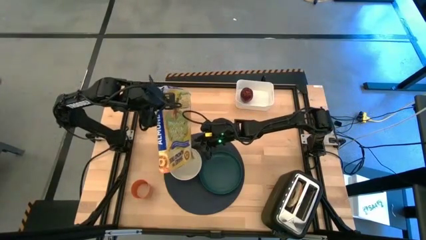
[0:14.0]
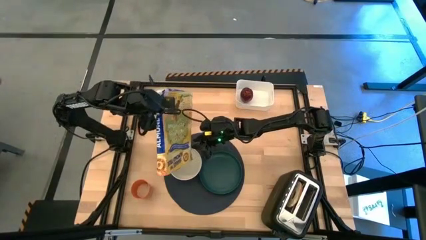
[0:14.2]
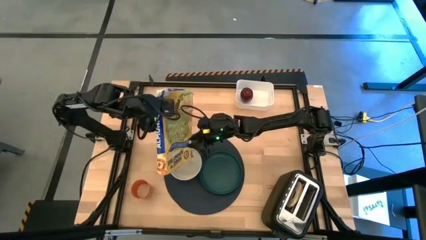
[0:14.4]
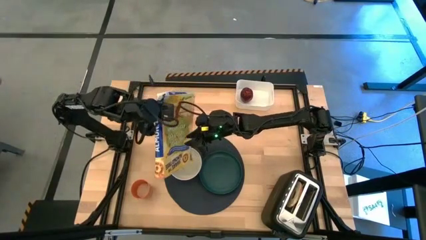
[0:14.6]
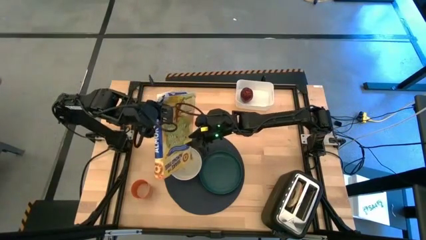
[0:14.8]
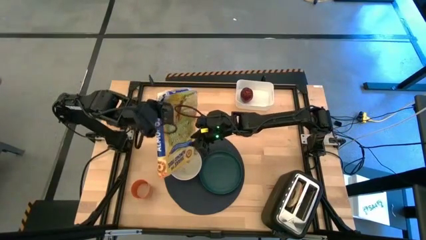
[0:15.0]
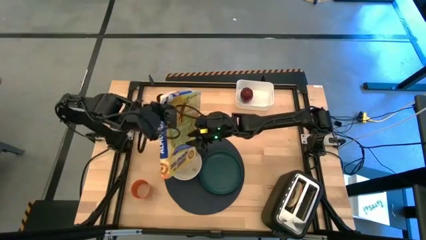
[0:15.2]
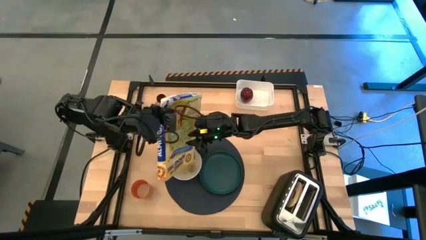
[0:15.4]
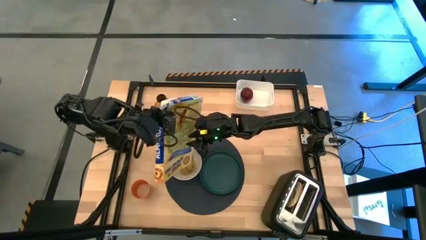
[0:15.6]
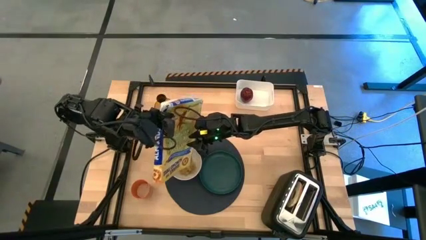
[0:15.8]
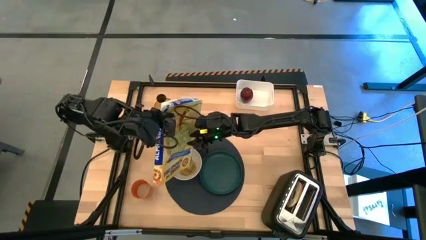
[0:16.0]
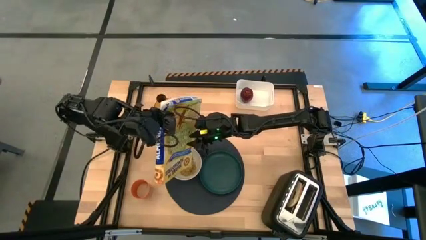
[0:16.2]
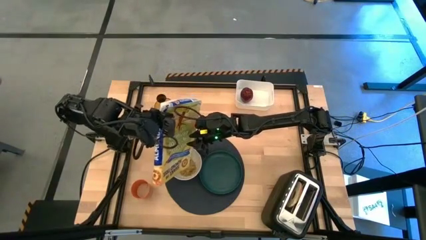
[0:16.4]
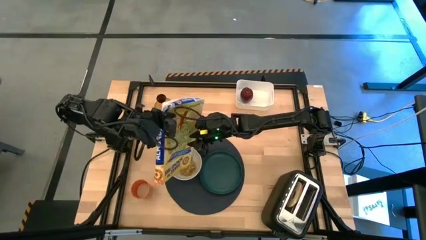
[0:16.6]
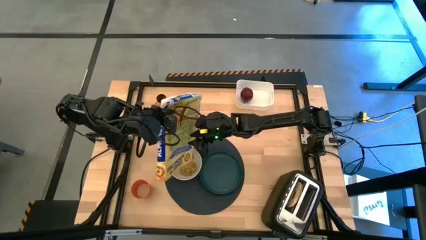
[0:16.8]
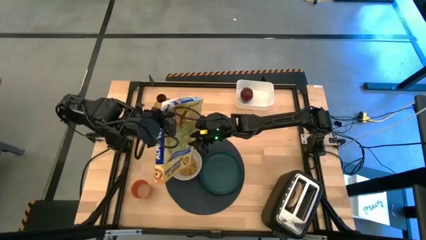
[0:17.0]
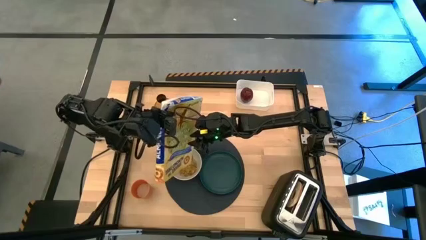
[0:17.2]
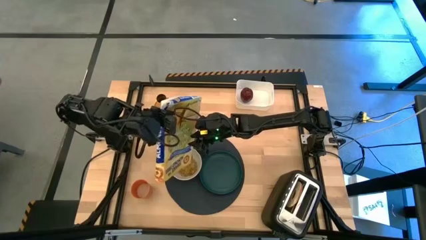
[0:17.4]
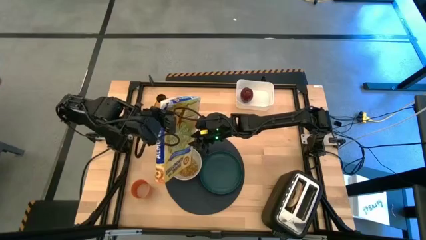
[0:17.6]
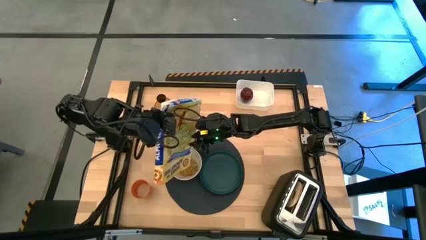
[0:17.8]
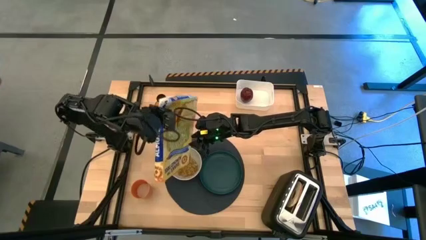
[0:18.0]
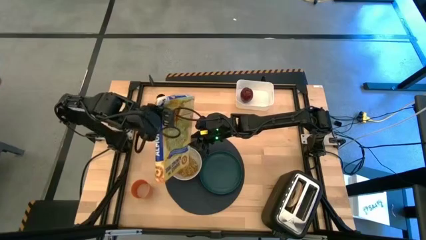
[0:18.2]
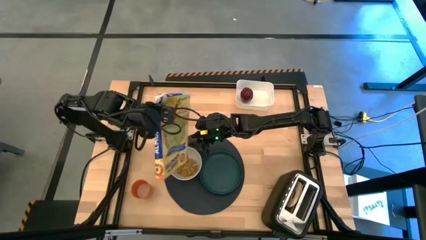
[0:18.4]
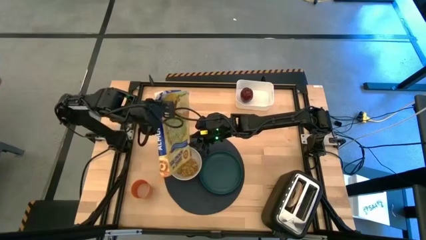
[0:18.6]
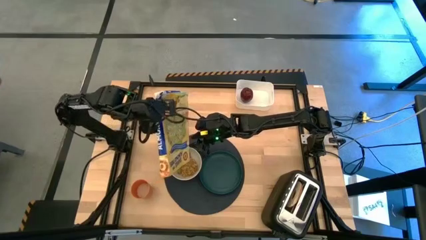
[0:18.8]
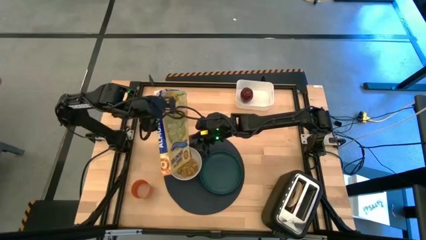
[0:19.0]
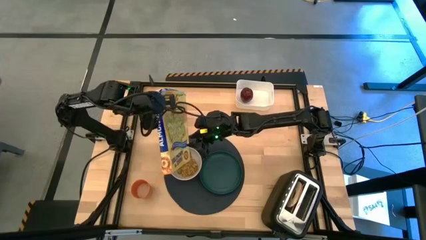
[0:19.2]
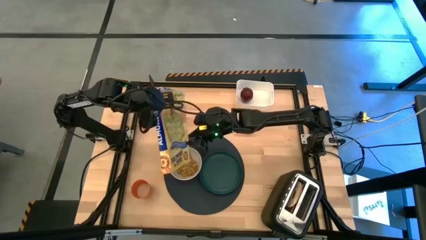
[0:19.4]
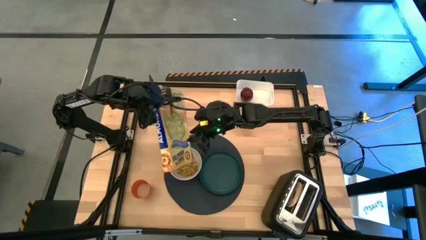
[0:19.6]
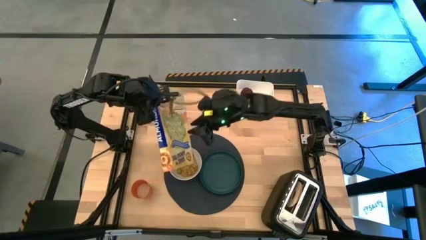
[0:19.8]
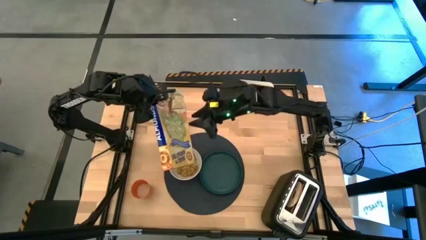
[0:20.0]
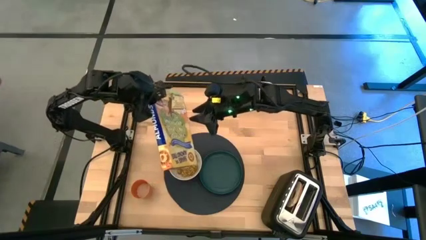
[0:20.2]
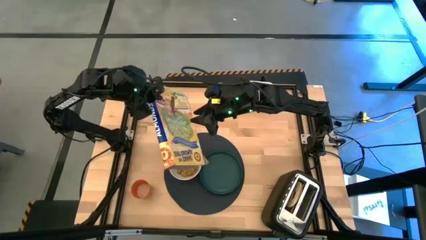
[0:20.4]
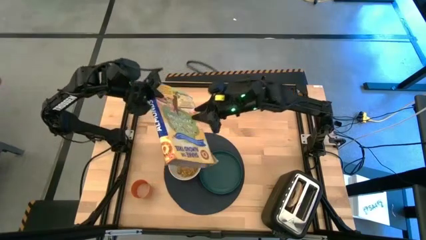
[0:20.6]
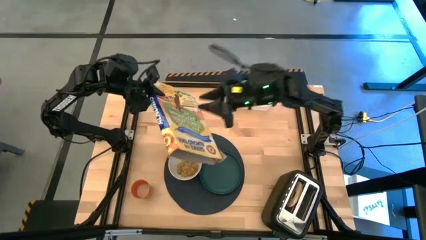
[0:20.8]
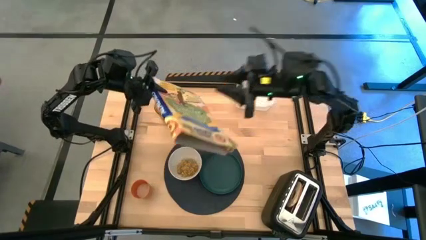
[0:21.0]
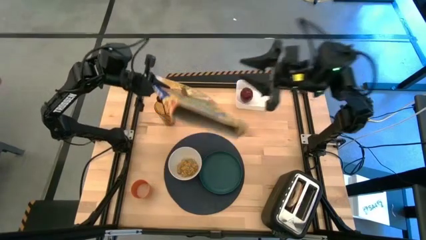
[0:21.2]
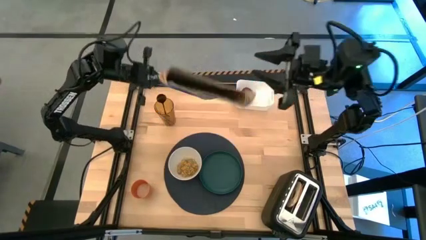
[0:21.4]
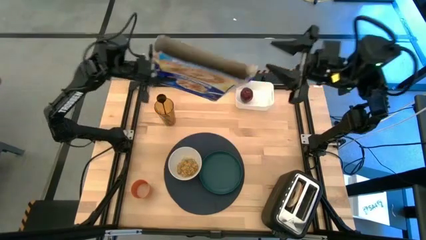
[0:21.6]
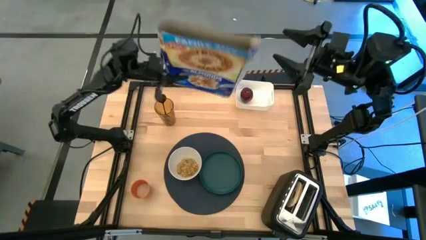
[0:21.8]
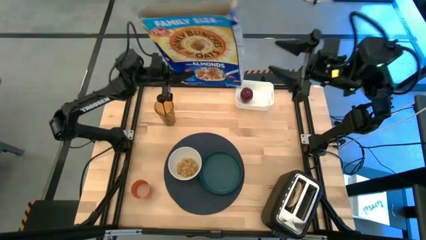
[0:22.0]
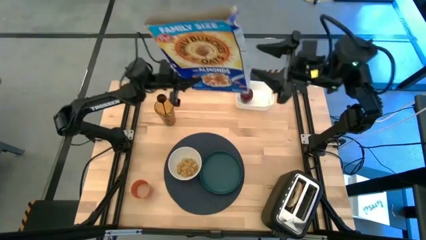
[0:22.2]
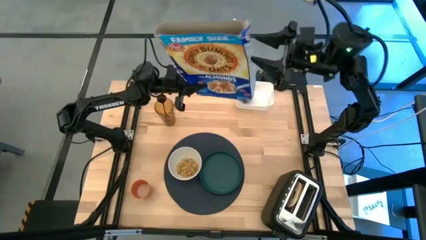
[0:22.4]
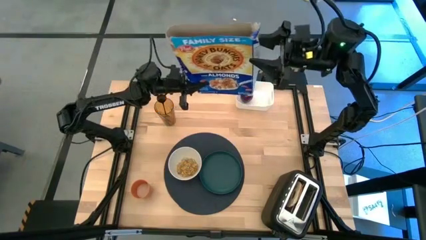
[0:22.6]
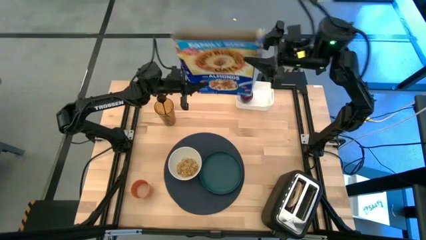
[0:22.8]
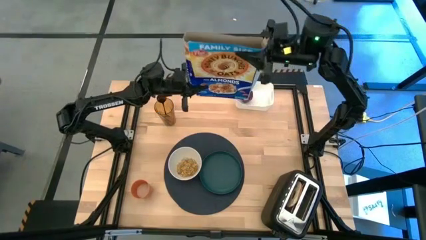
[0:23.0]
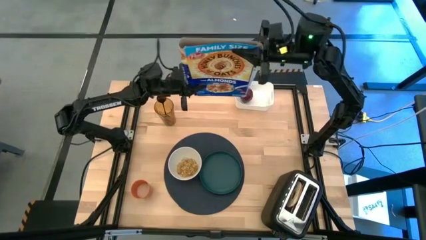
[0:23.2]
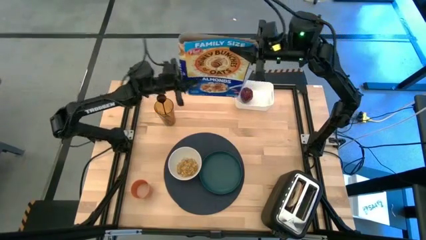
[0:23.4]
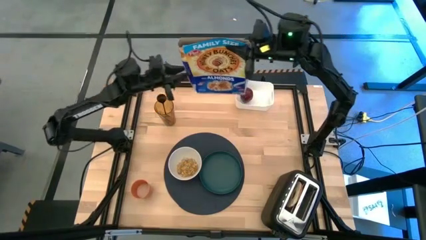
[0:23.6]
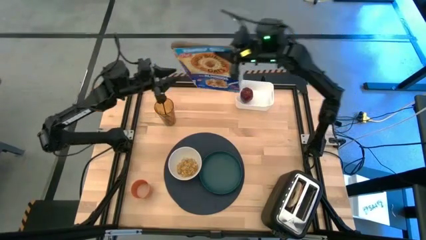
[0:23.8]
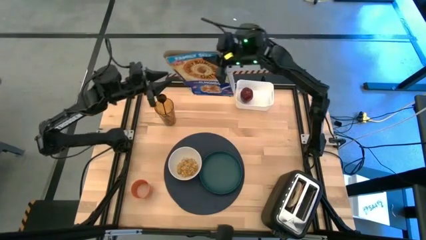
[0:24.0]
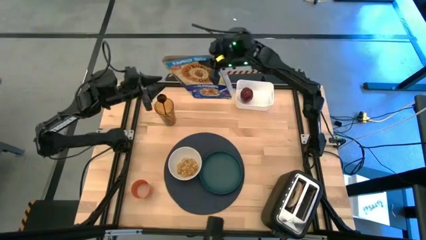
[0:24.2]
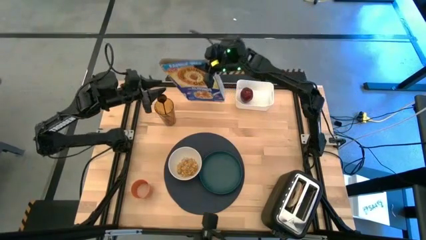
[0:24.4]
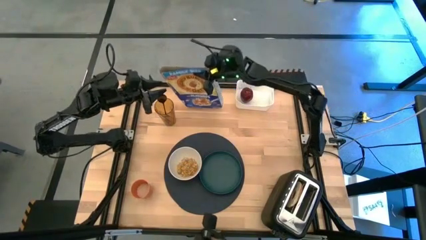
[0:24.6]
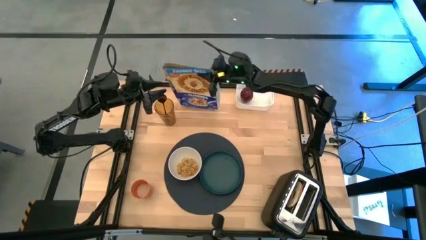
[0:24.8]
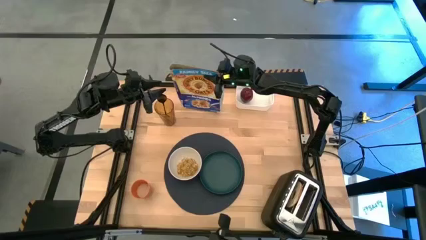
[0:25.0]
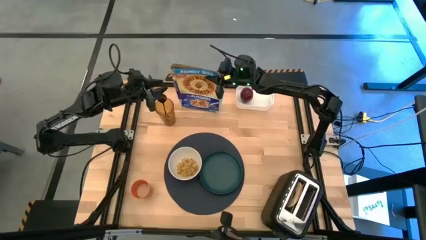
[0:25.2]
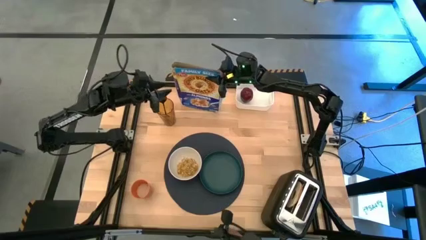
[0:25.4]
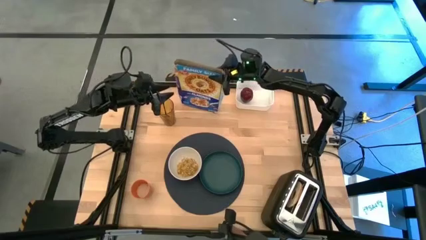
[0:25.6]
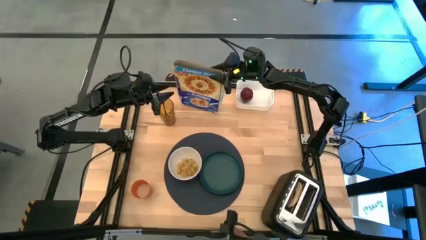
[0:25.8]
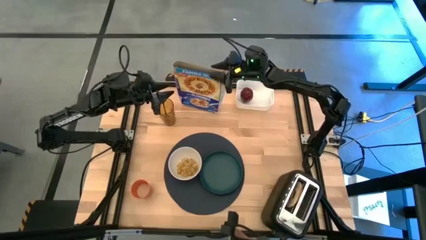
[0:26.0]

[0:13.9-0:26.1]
Task: Arrange a breakfast setting
Pour the cereal from the blue cereal box into the white bowl

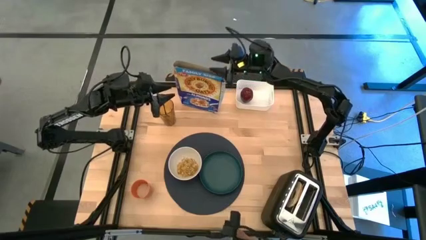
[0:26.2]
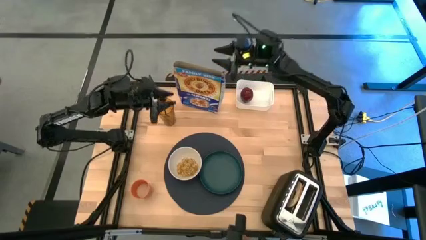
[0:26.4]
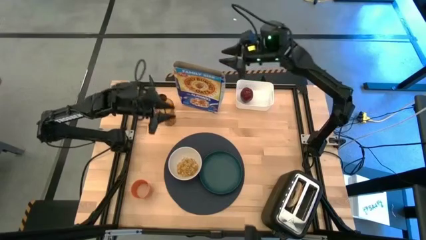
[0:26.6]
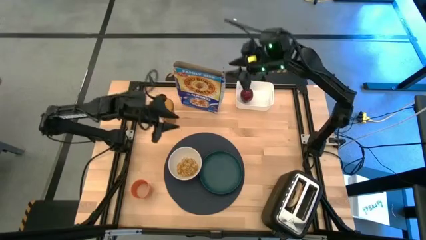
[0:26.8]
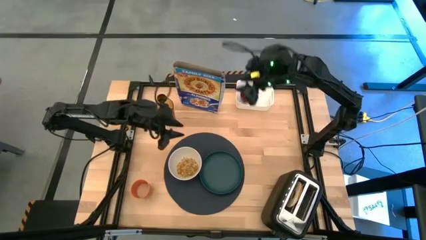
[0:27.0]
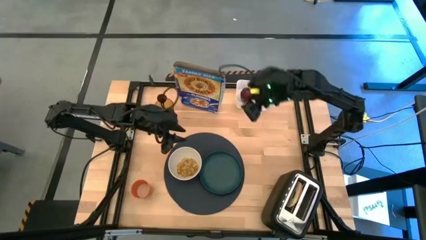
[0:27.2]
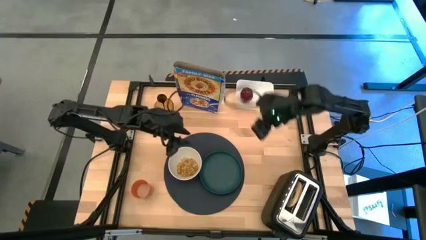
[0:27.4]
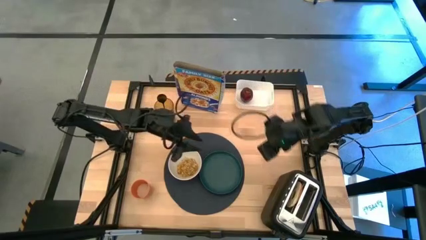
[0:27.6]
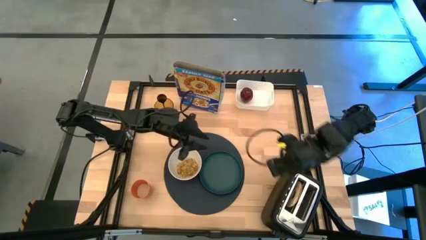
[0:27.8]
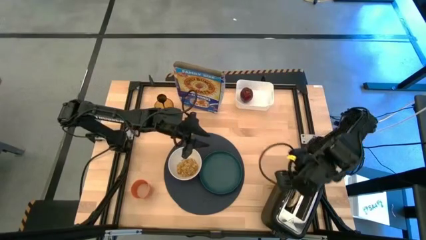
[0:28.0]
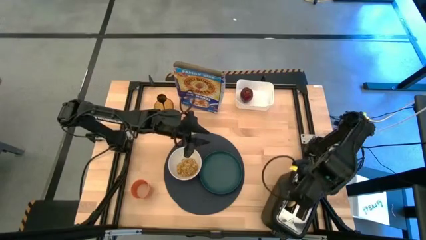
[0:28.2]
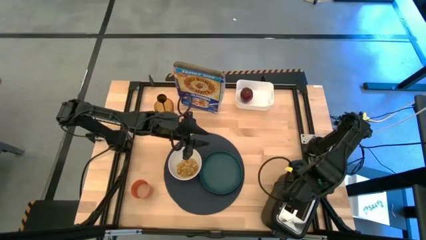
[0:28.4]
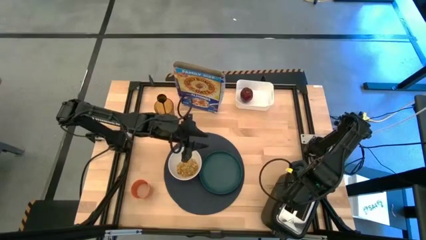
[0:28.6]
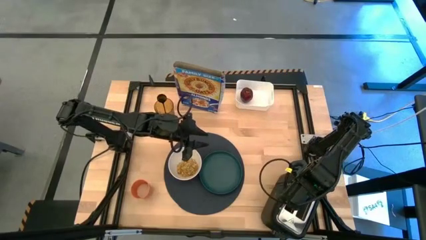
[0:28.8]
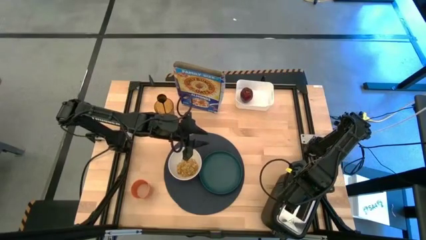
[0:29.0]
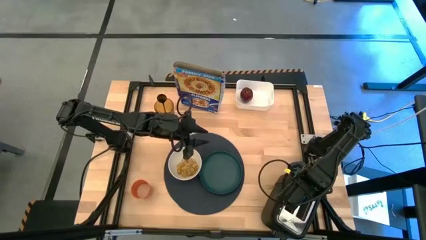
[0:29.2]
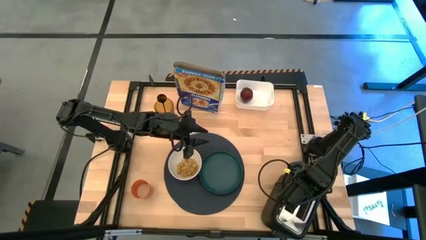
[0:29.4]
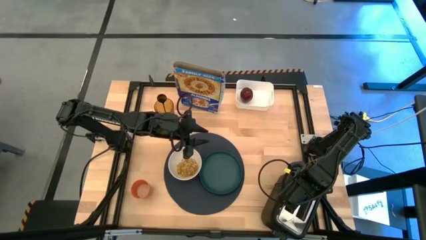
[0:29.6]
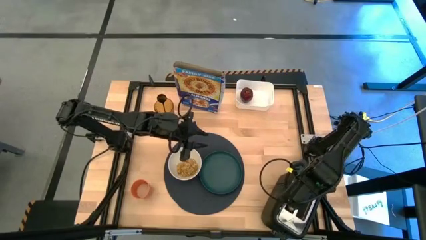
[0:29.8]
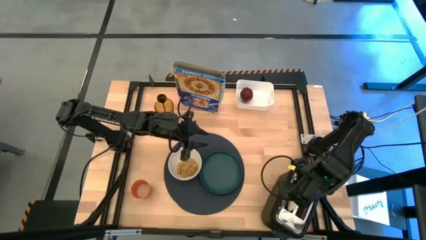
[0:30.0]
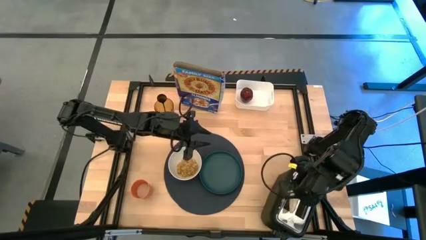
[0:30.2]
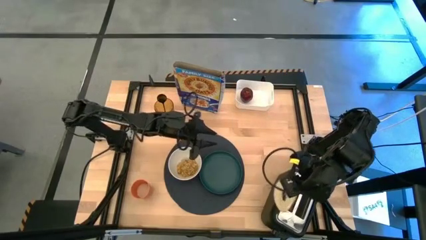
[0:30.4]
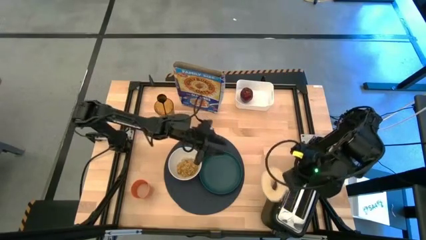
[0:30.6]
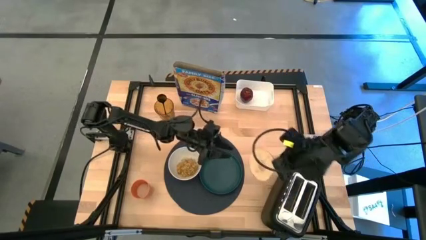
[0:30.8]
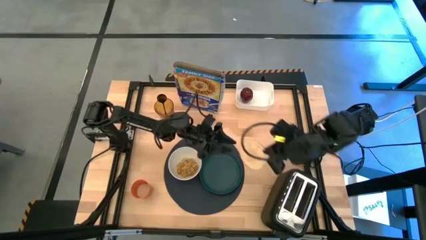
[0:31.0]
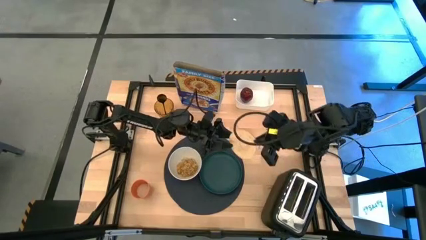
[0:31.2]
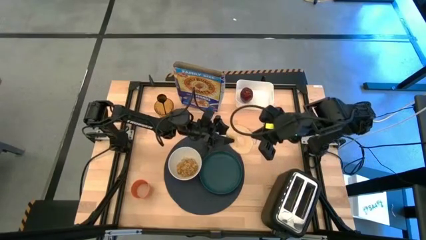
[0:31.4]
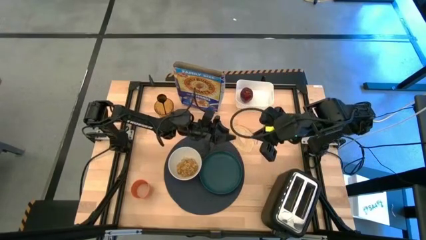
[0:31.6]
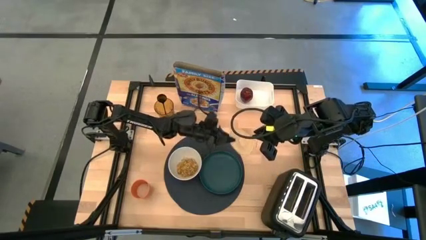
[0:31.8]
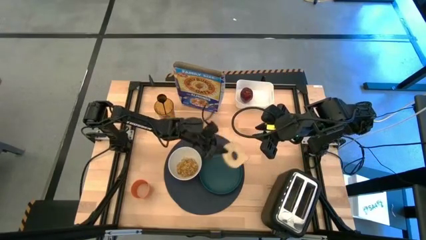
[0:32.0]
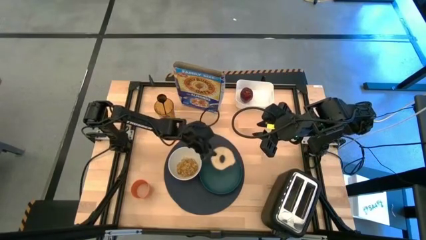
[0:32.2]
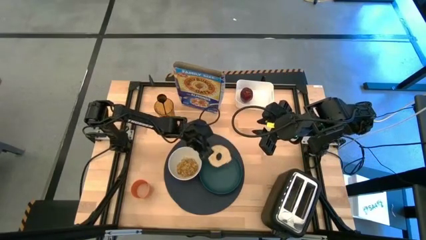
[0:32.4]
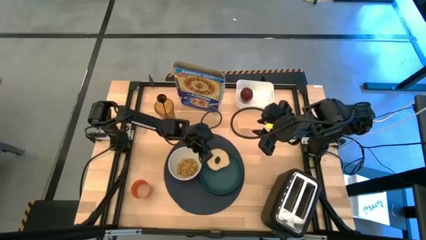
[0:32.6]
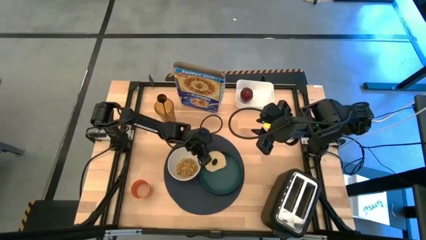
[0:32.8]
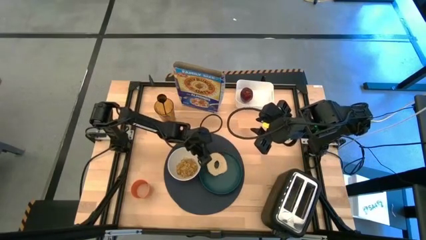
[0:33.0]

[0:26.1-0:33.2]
Put the bagel onto the blue plate
